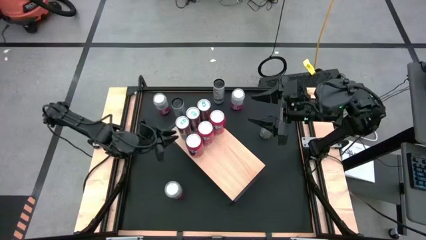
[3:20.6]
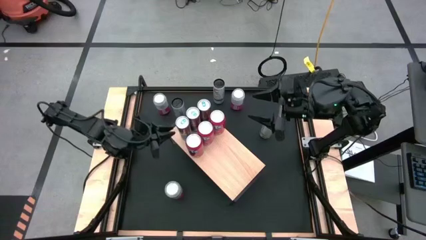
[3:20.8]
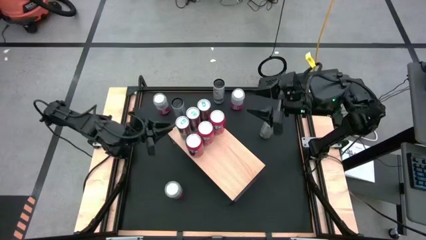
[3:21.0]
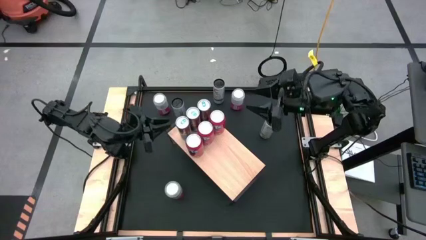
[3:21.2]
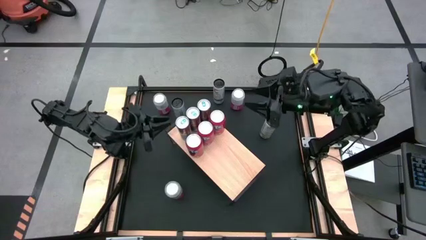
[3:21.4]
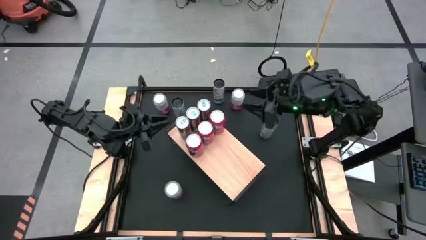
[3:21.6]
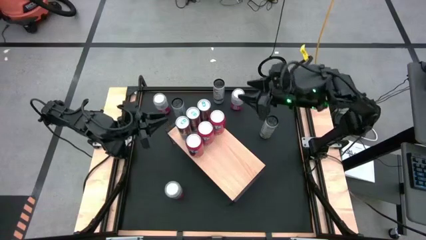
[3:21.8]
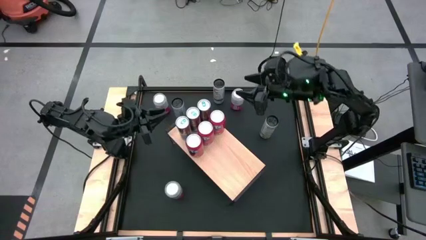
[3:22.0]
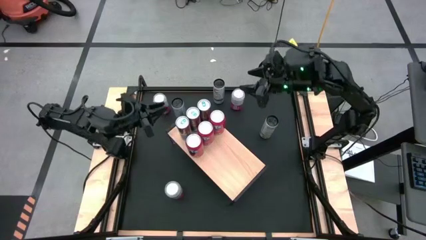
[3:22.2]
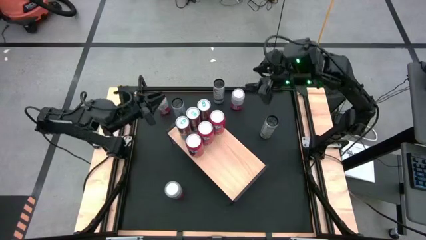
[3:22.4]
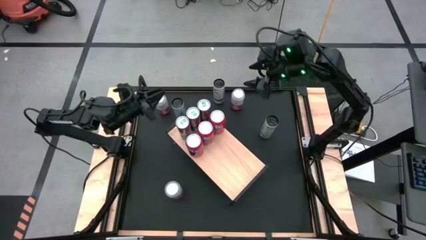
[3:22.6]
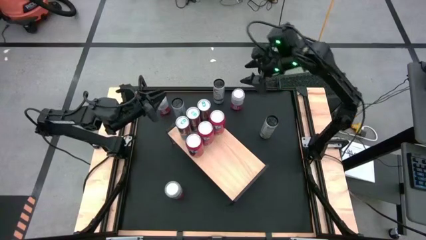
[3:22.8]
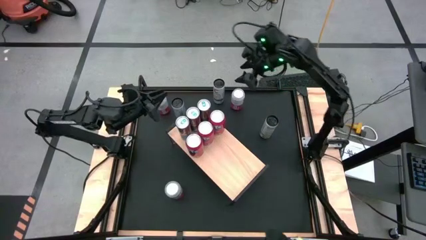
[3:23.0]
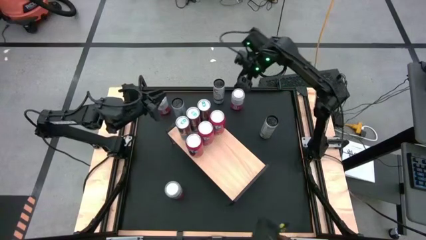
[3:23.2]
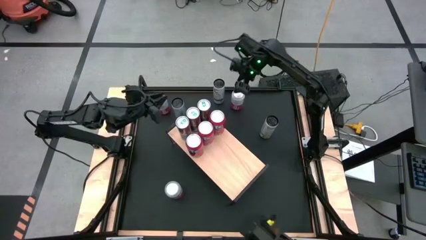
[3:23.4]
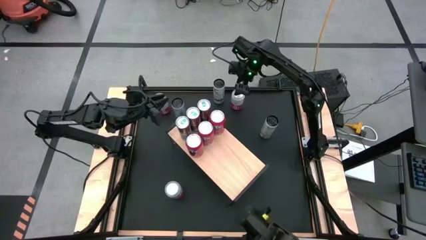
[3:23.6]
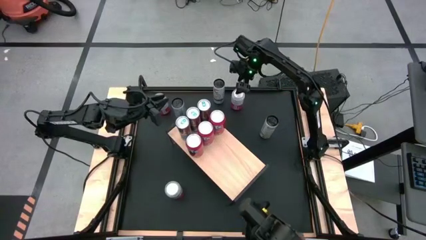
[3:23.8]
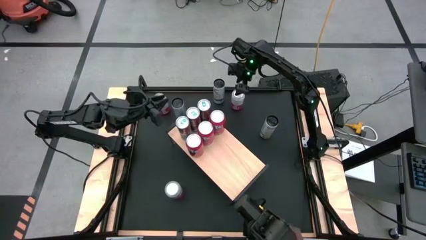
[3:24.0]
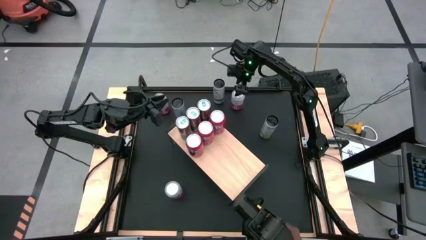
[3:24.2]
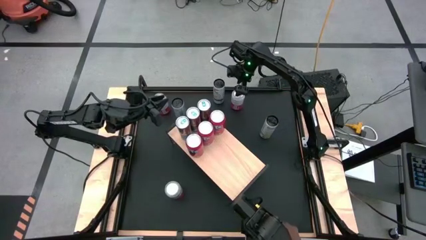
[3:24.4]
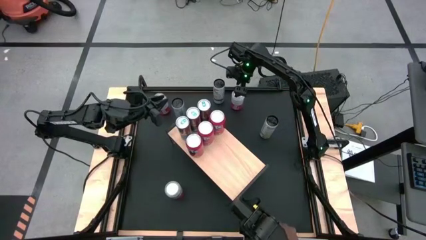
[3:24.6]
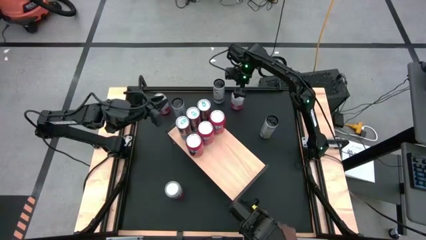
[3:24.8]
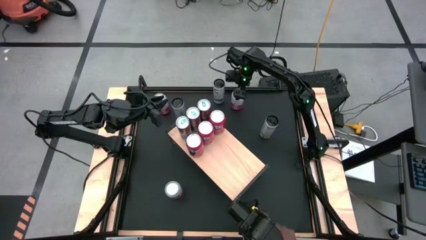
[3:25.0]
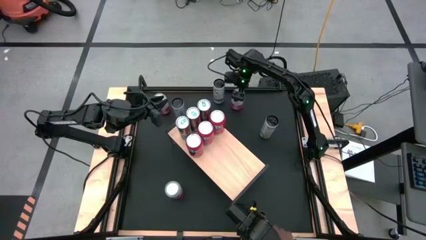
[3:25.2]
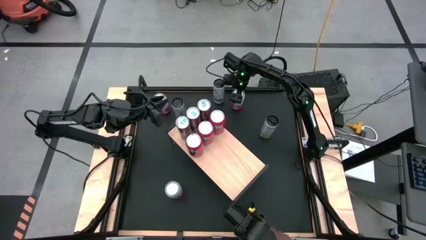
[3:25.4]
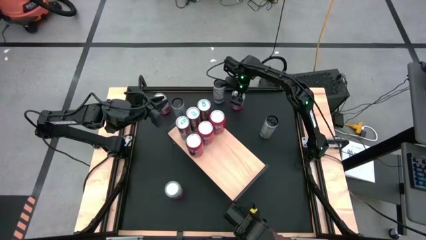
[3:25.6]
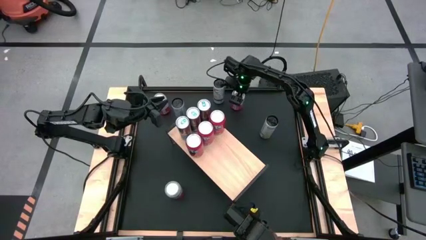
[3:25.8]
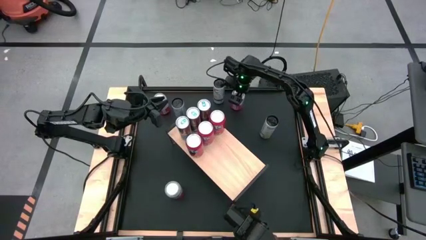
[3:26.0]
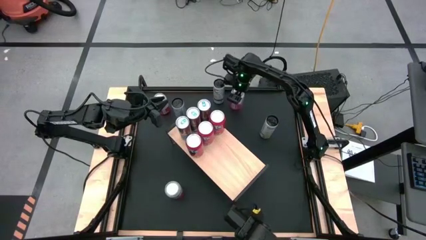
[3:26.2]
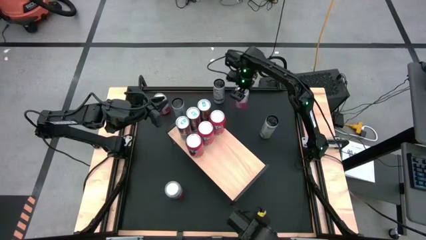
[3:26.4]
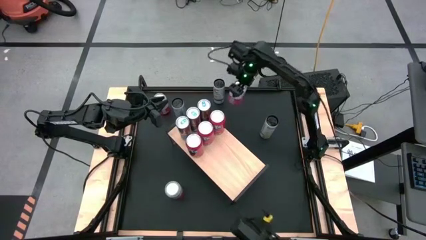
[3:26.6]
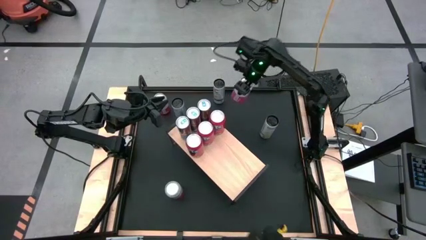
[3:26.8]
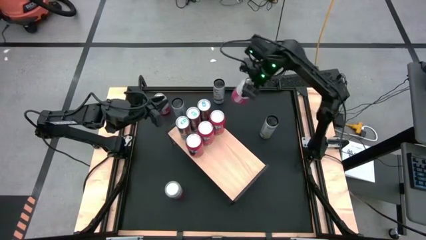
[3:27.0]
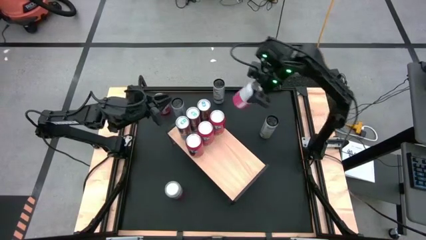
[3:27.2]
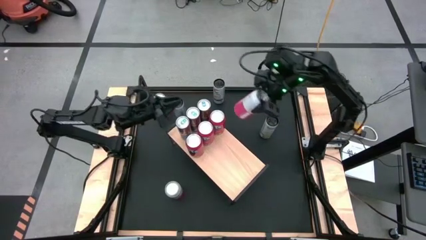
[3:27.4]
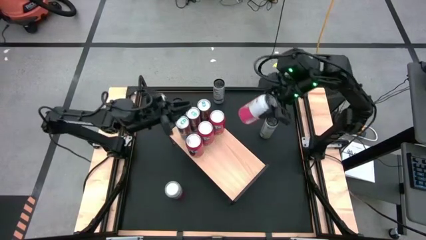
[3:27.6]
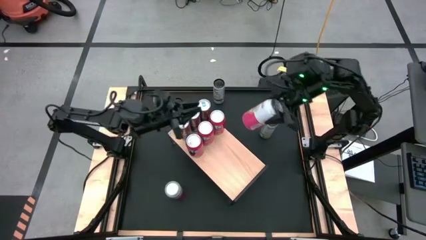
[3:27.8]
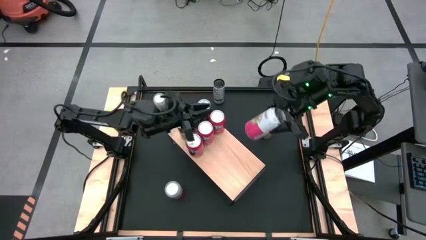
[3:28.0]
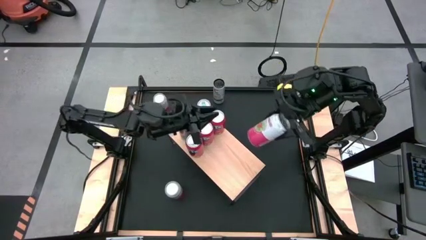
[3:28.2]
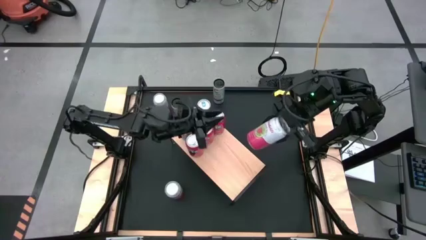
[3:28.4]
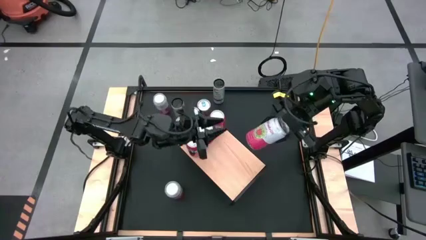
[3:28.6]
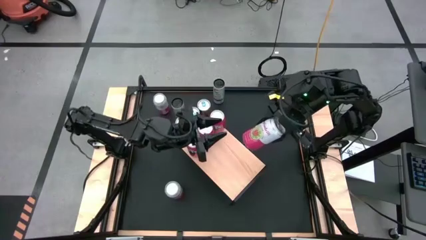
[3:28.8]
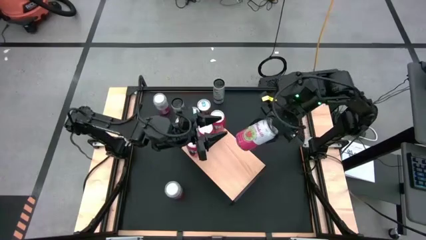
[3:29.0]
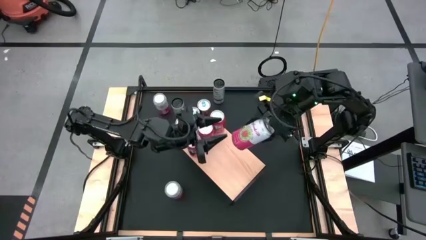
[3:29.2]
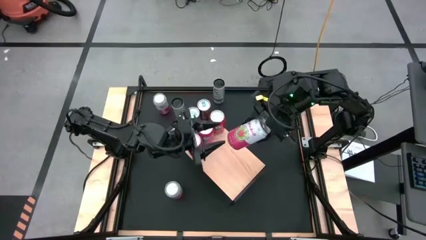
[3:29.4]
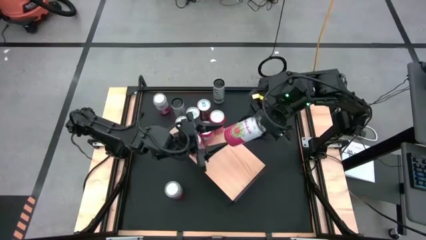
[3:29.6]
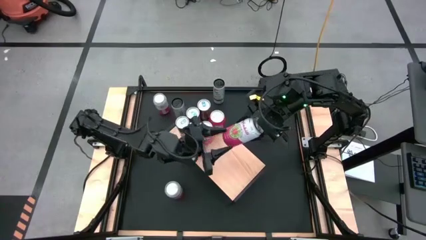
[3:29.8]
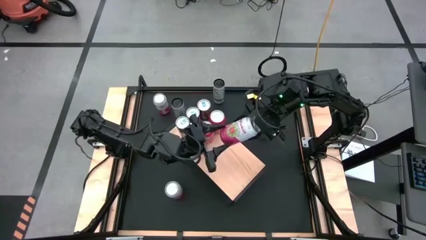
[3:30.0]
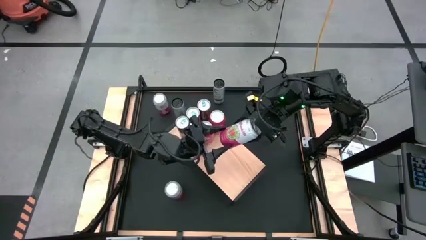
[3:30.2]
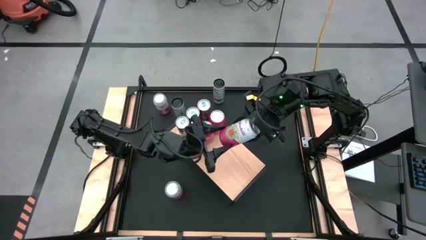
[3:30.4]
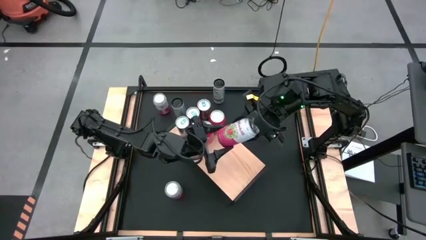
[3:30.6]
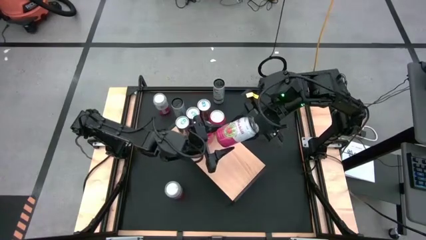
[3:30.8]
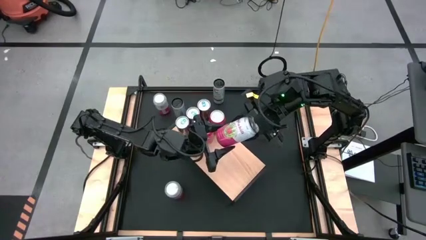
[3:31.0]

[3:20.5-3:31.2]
Task: Place canned beverage on shelf
Put the right pink soda can on the shelf

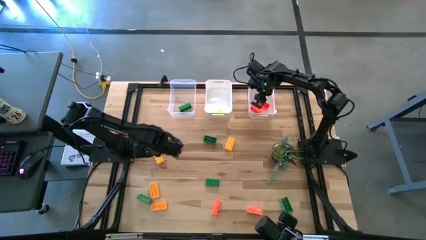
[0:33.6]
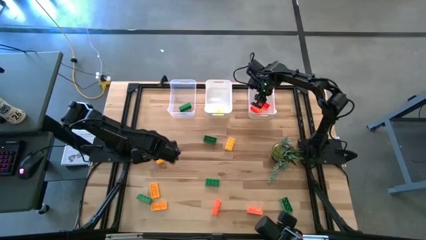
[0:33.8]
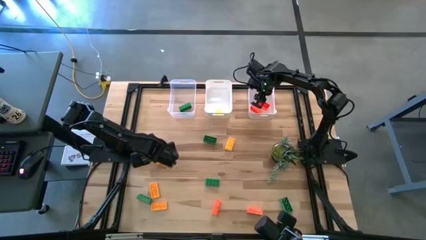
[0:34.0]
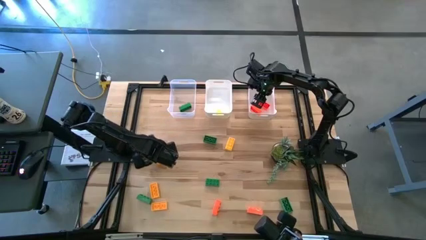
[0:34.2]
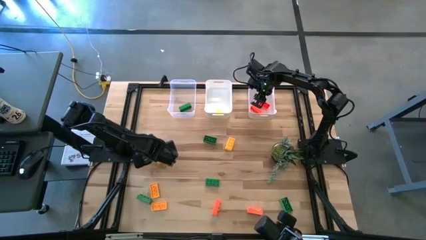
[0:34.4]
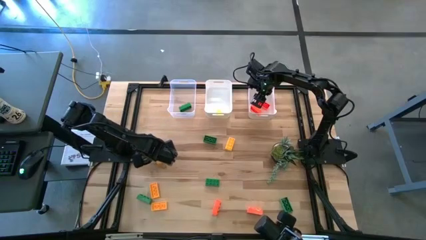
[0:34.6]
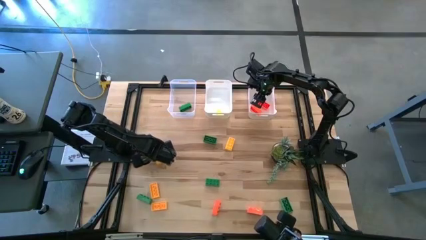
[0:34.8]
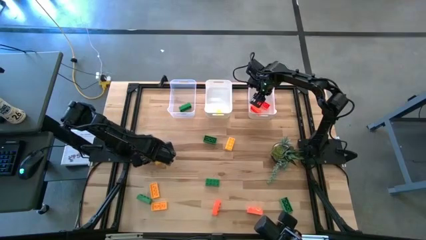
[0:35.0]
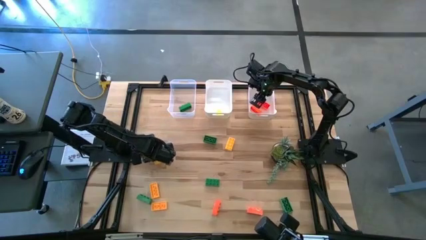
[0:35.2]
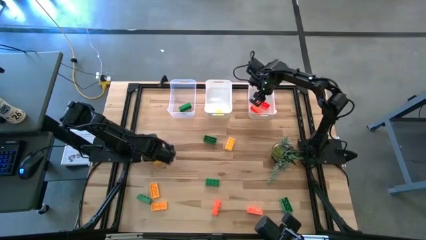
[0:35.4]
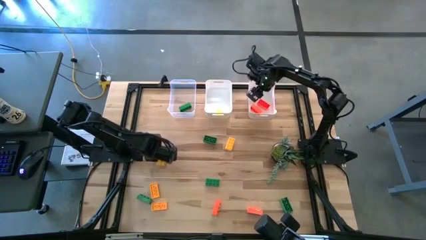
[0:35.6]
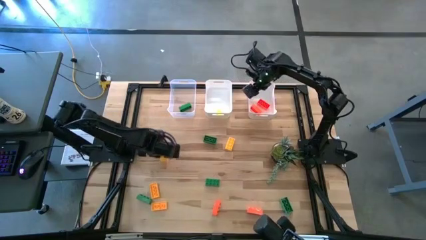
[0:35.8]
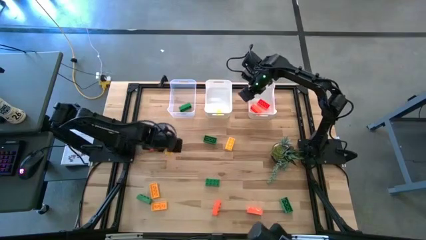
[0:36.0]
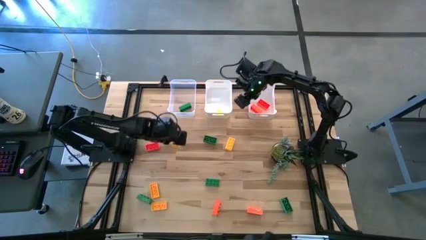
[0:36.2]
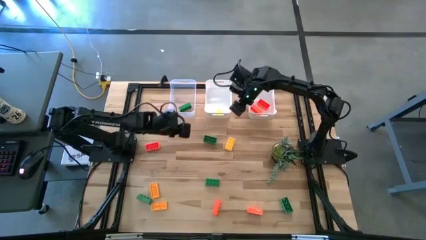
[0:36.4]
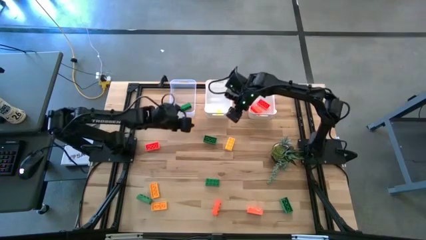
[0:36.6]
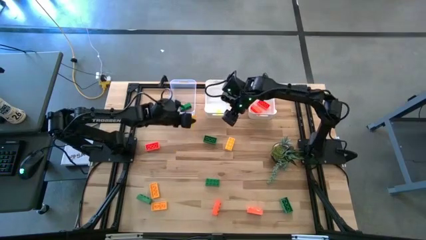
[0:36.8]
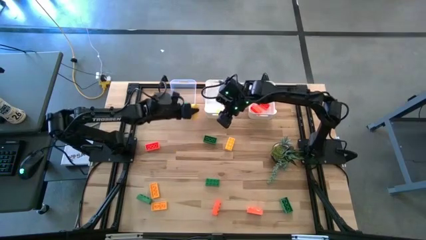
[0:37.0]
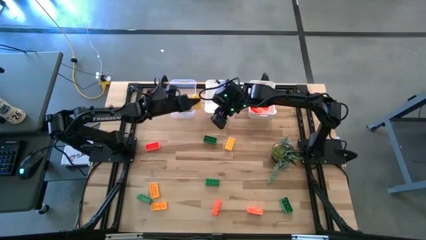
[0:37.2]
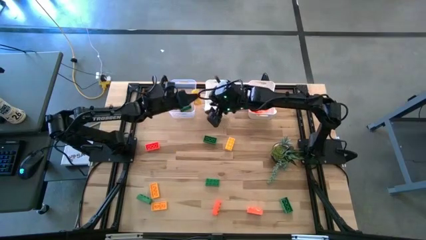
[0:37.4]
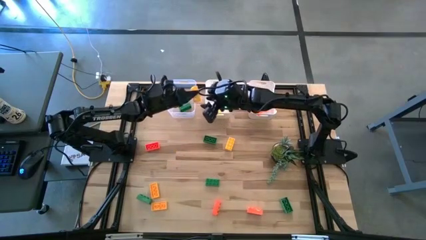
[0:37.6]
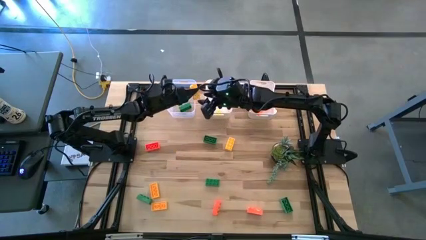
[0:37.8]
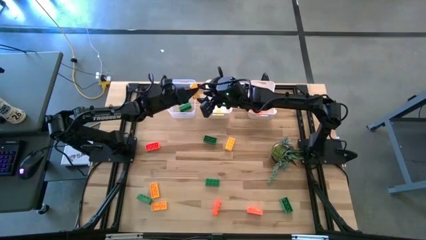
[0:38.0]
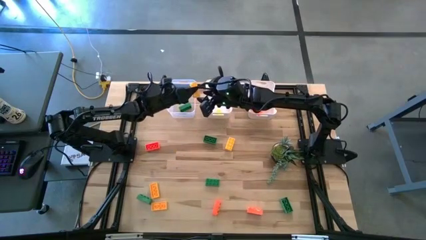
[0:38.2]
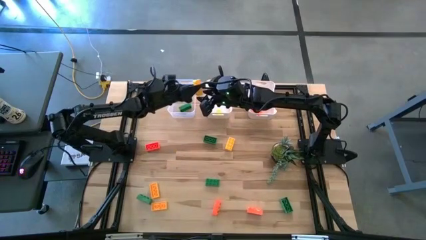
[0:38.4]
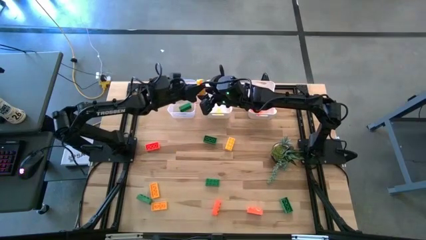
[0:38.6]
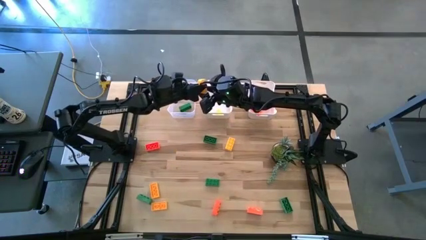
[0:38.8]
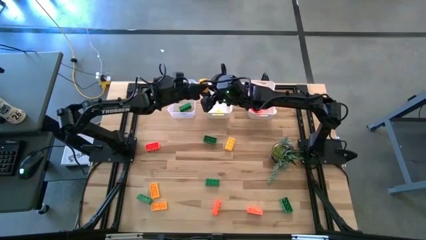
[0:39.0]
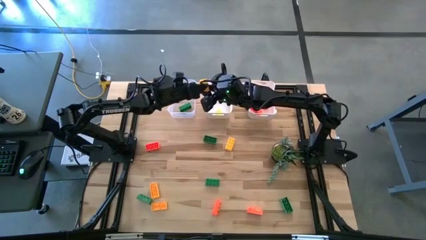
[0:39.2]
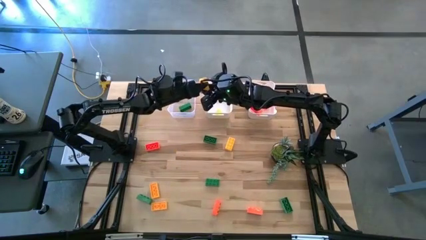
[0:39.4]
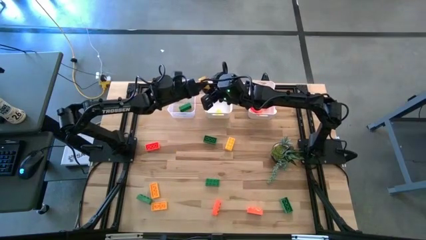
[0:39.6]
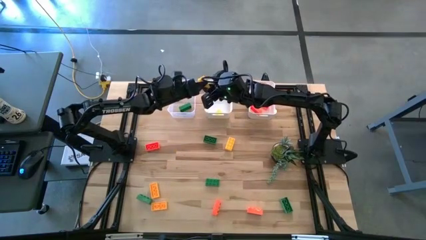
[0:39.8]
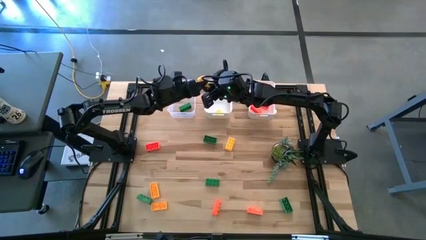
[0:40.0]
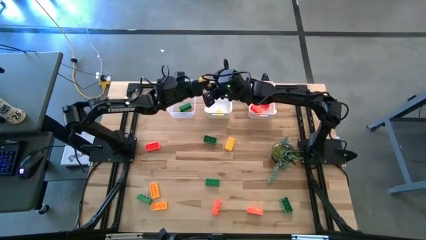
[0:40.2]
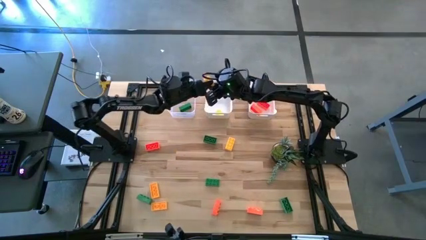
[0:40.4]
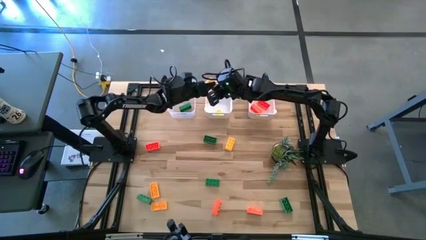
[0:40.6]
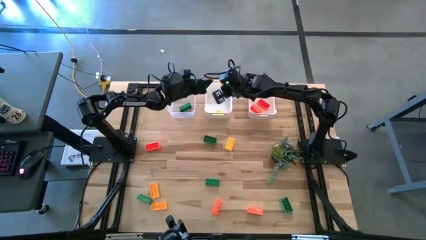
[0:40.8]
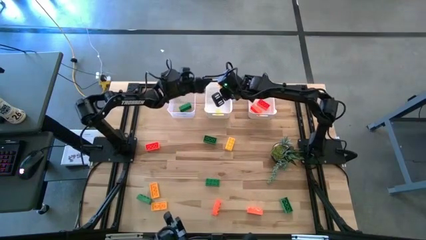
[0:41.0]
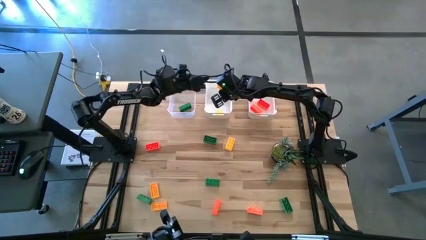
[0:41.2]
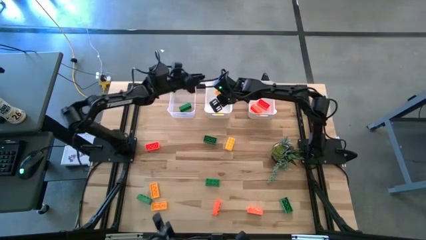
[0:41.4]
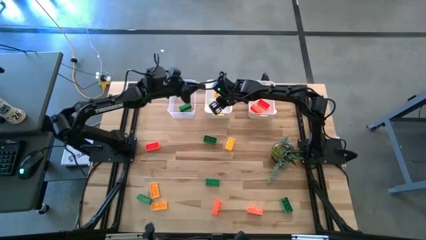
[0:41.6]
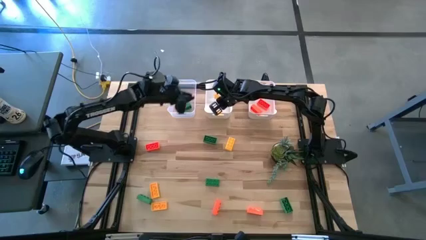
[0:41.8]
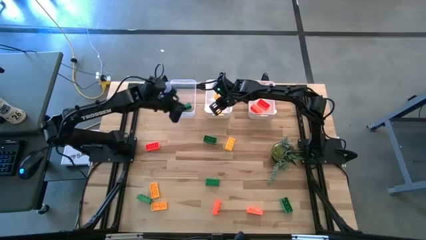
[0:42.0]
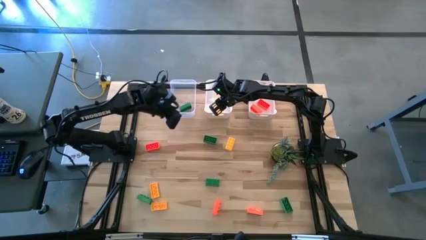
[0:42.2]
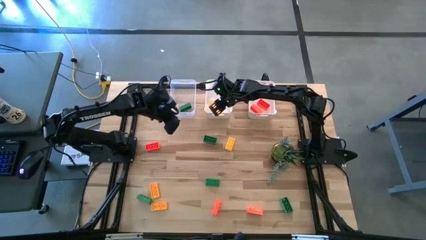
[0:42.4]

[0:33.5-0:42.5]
Task: Sort & place blocks by color
Put the yellow game piece into the left white bin
